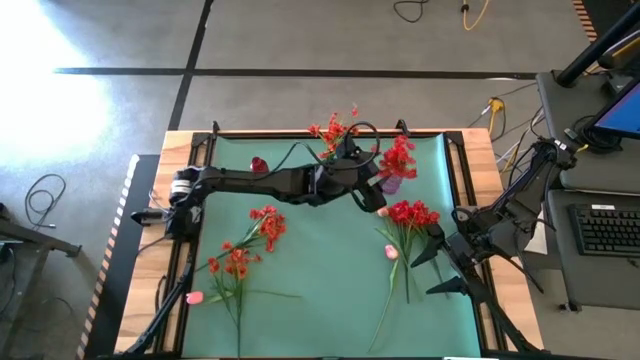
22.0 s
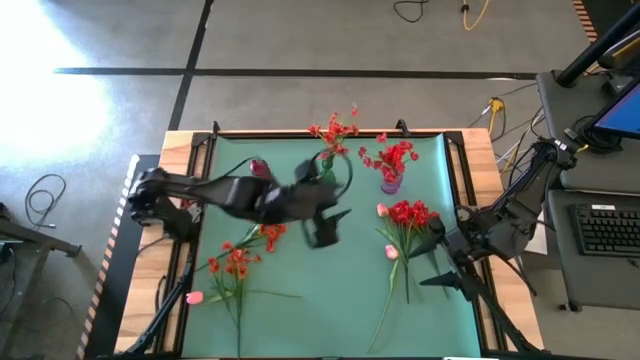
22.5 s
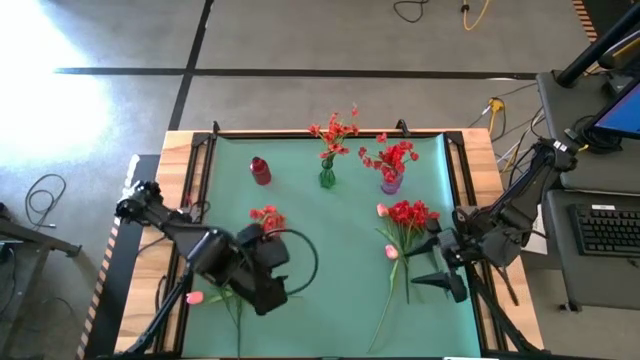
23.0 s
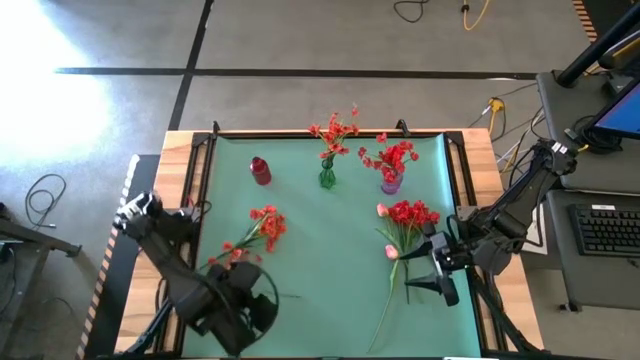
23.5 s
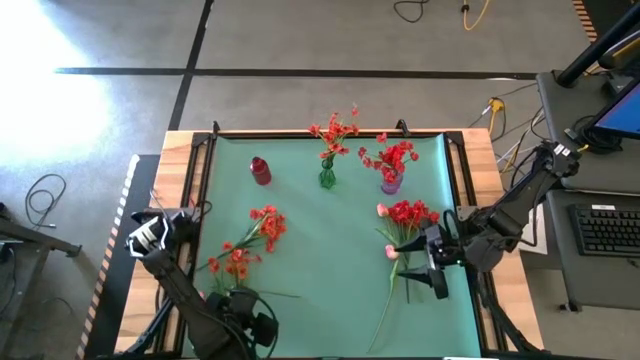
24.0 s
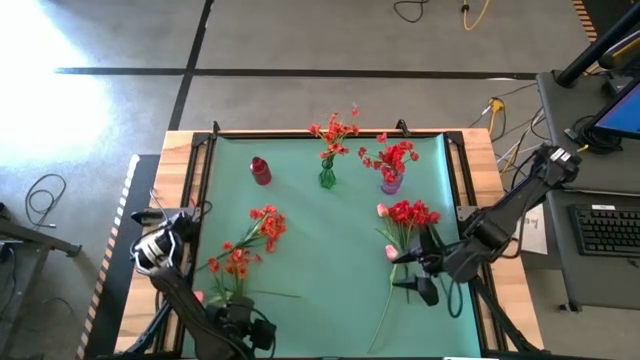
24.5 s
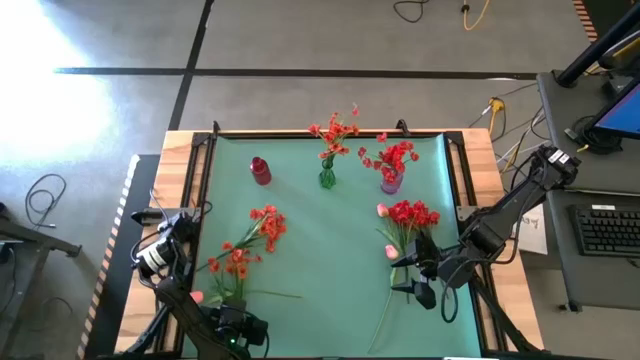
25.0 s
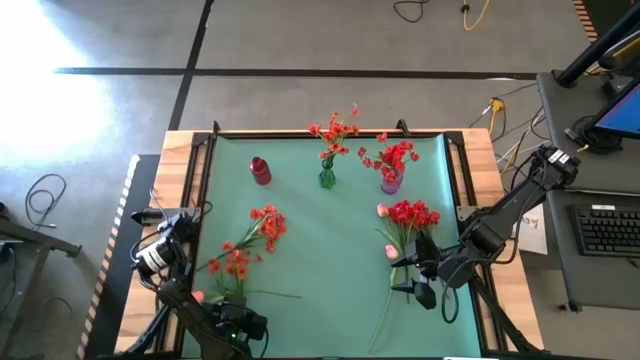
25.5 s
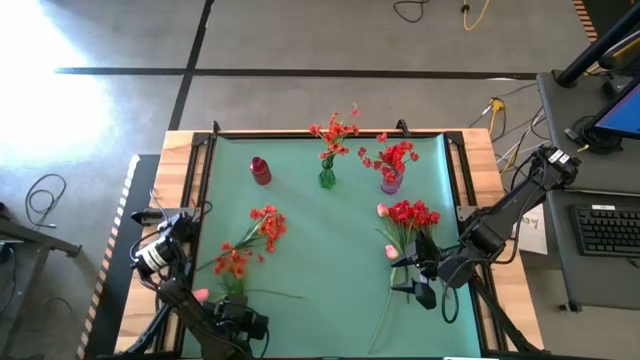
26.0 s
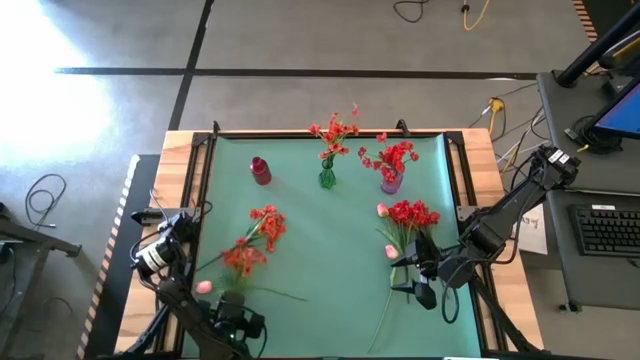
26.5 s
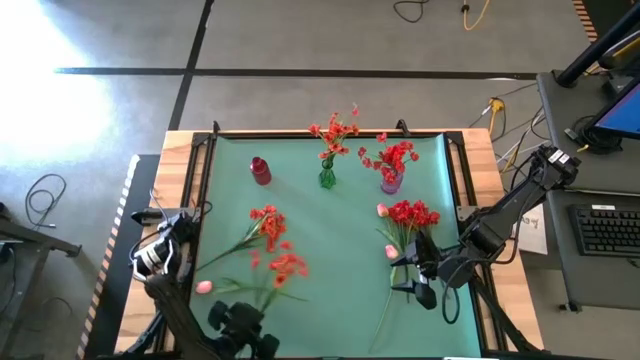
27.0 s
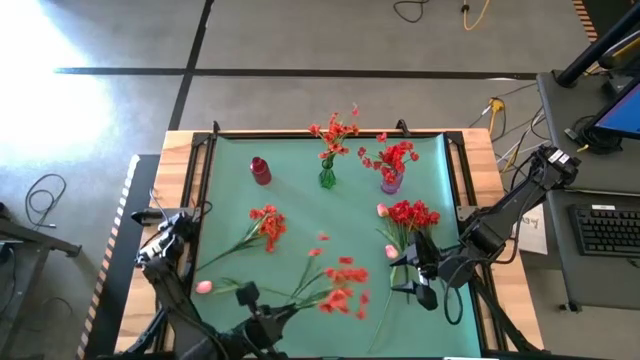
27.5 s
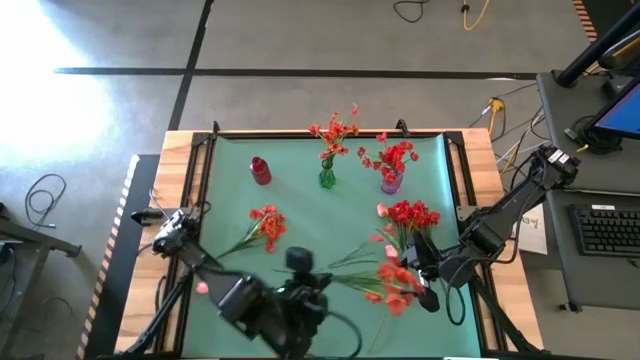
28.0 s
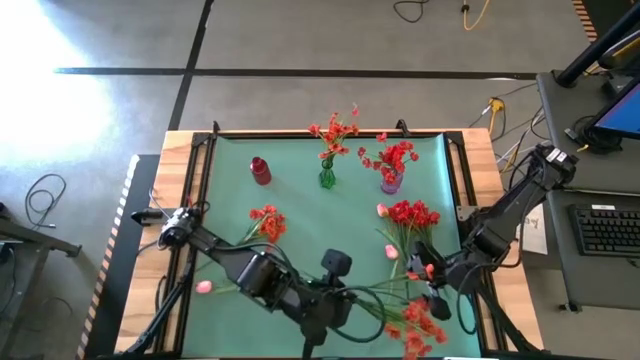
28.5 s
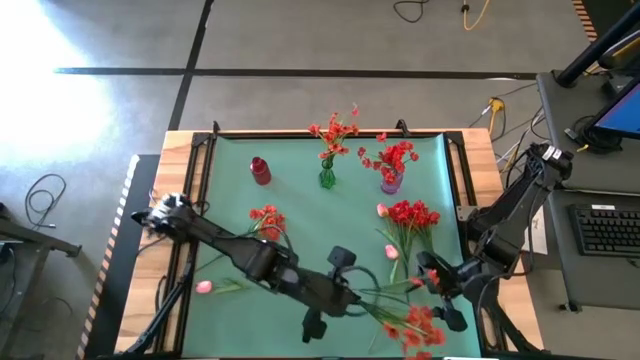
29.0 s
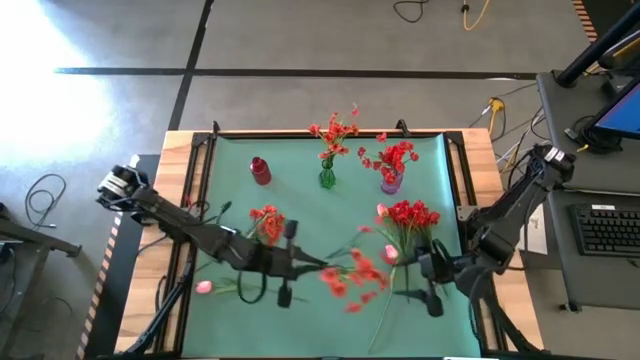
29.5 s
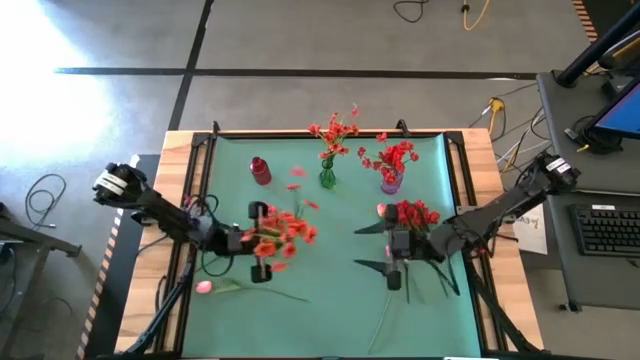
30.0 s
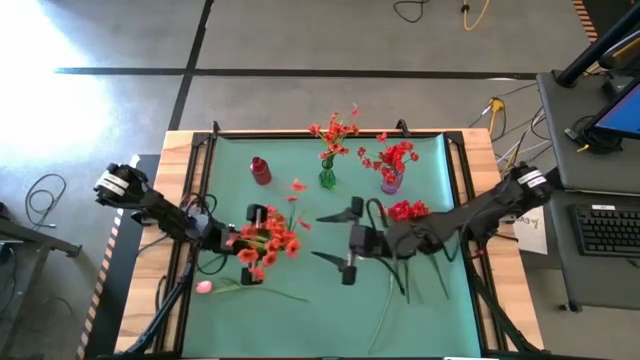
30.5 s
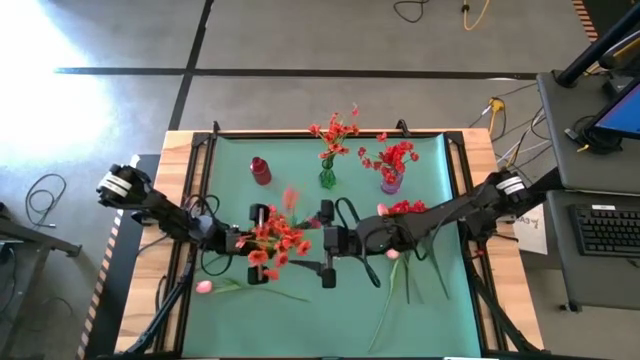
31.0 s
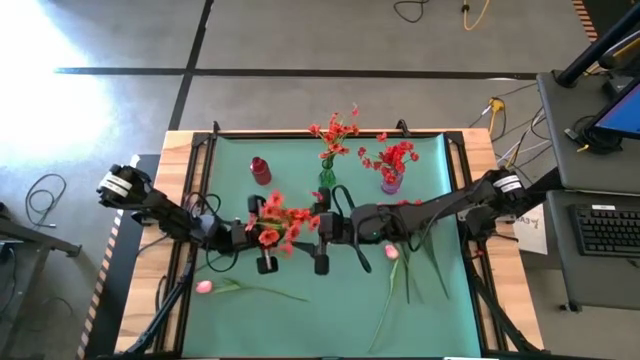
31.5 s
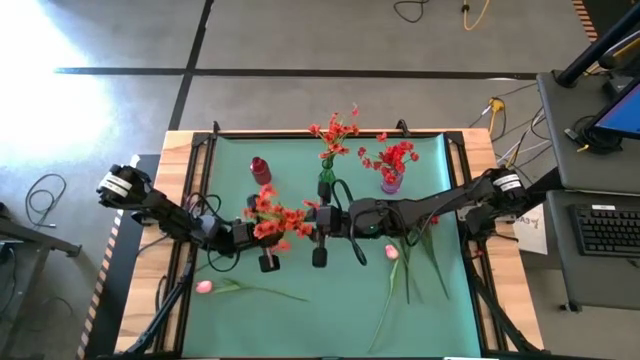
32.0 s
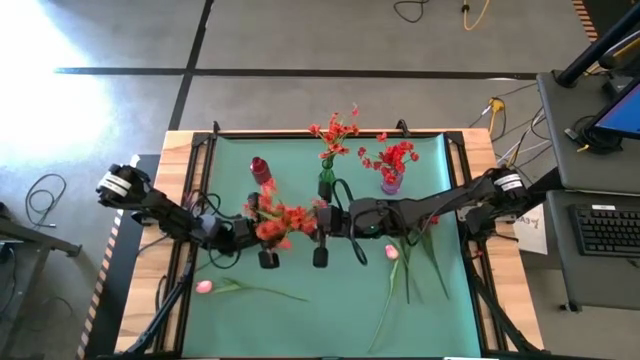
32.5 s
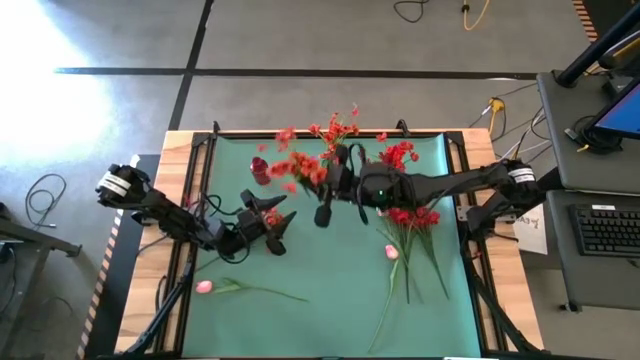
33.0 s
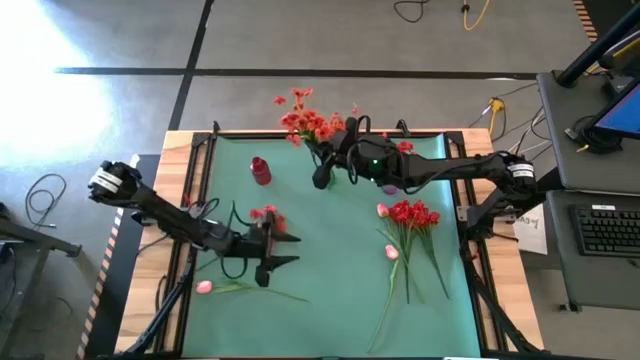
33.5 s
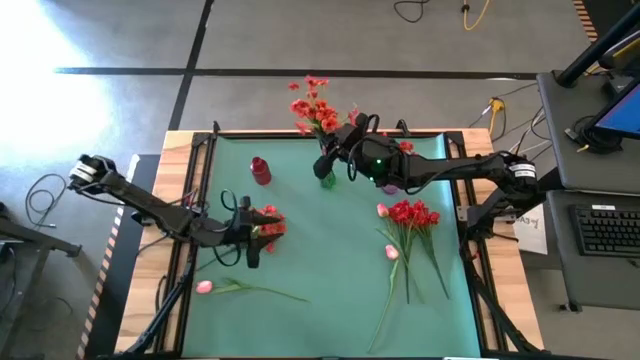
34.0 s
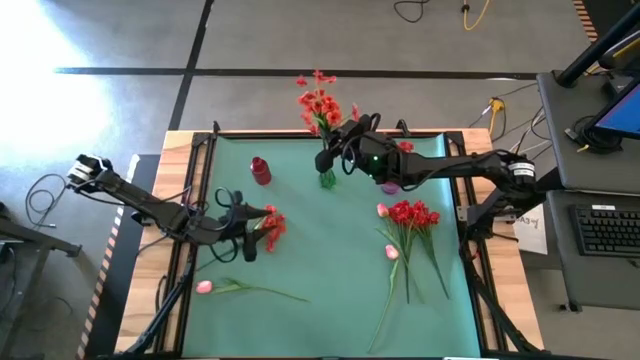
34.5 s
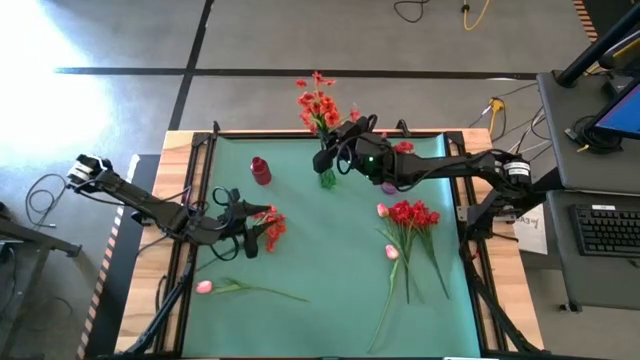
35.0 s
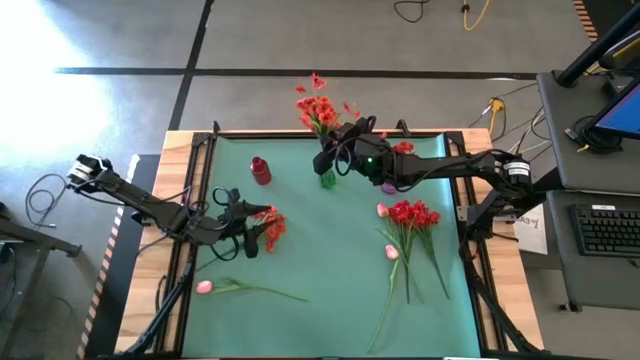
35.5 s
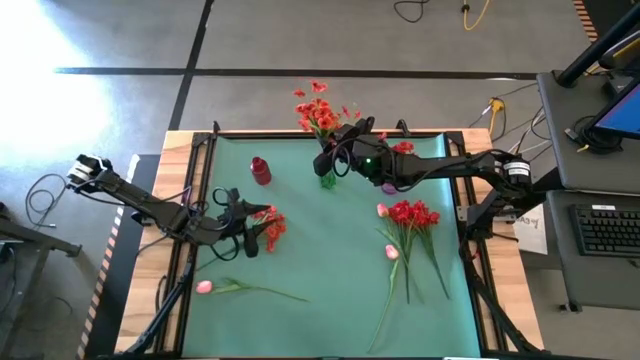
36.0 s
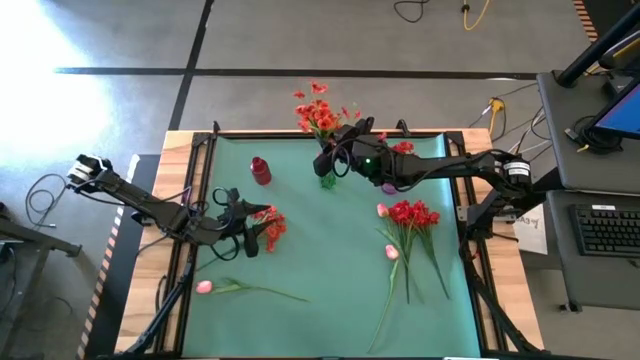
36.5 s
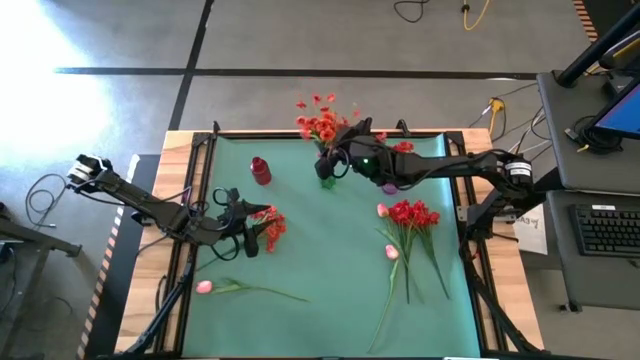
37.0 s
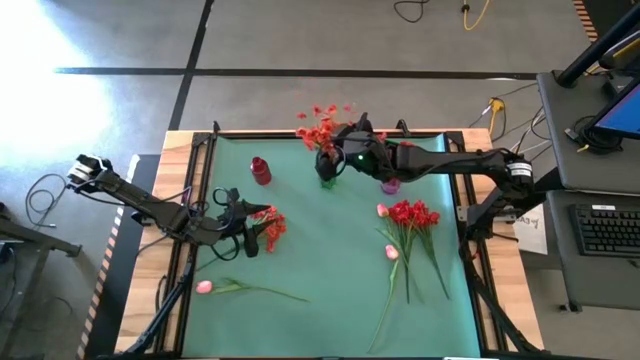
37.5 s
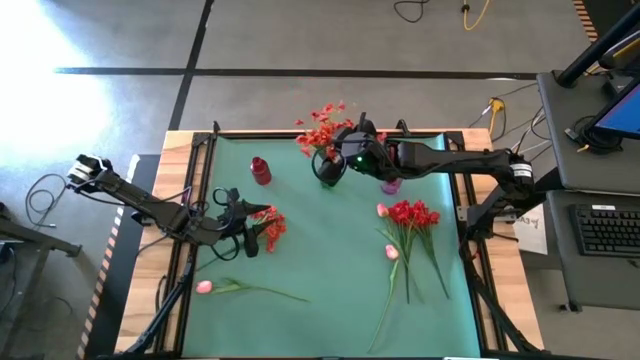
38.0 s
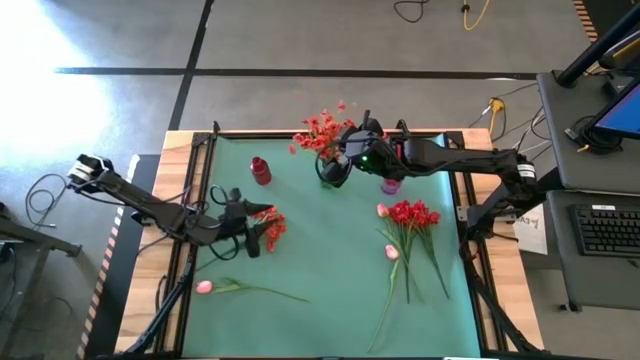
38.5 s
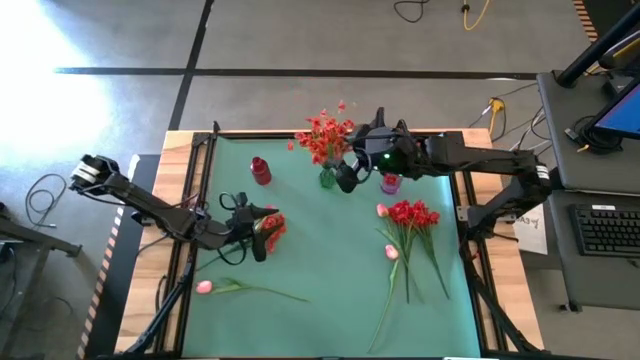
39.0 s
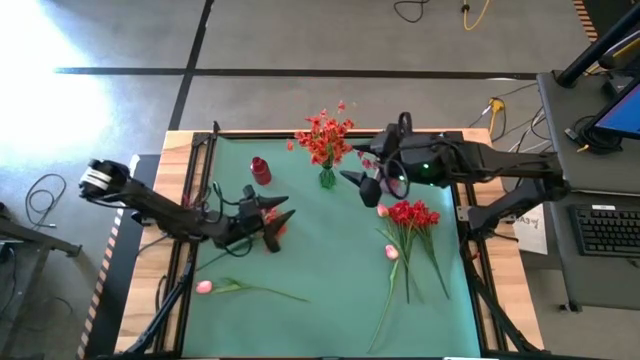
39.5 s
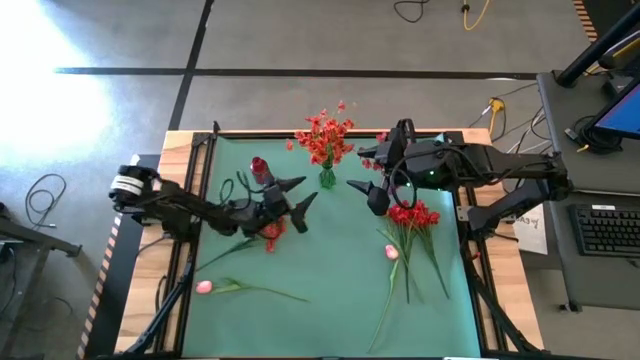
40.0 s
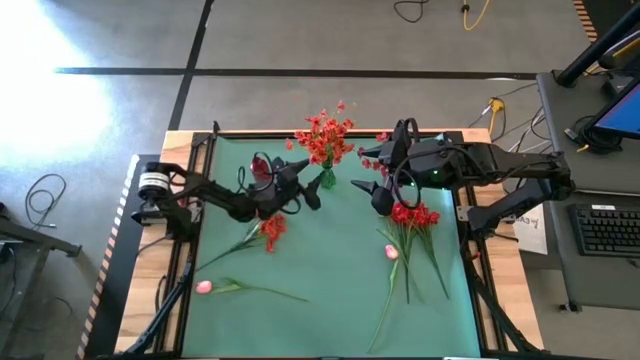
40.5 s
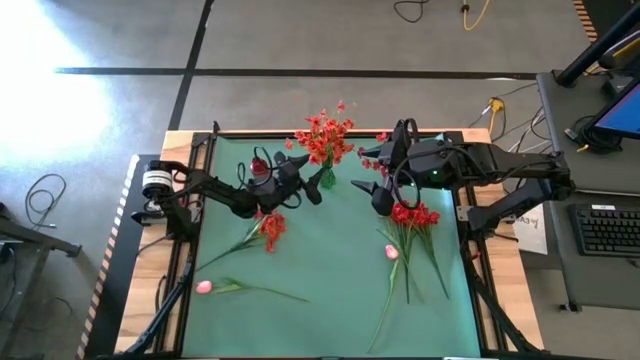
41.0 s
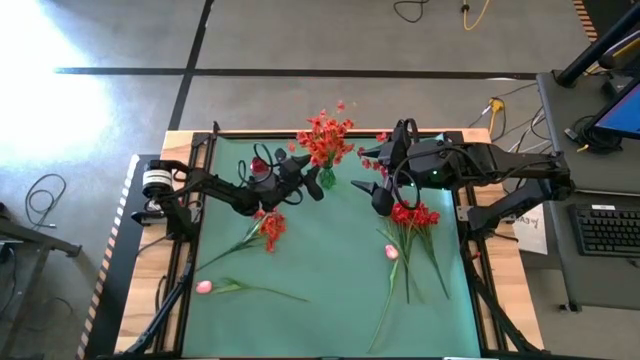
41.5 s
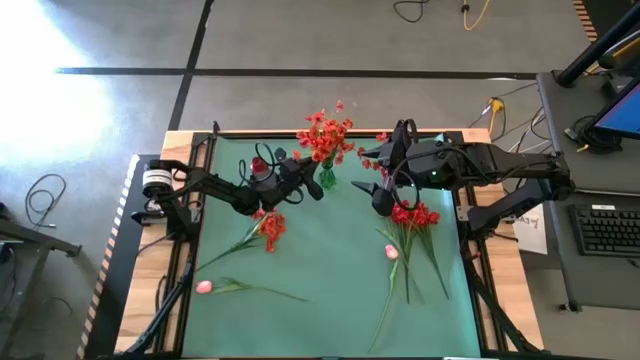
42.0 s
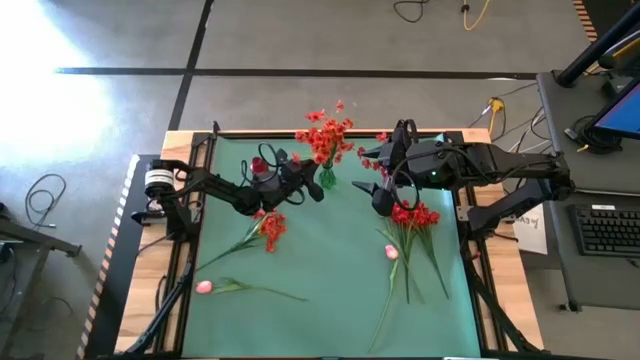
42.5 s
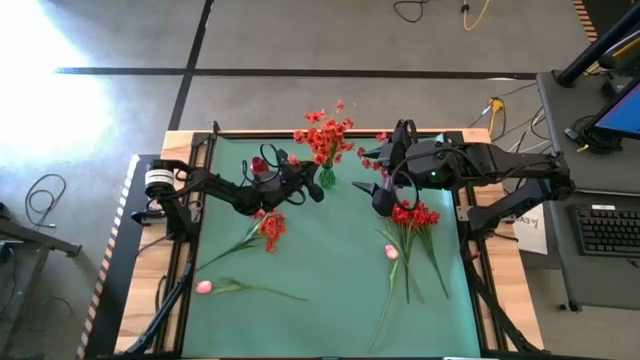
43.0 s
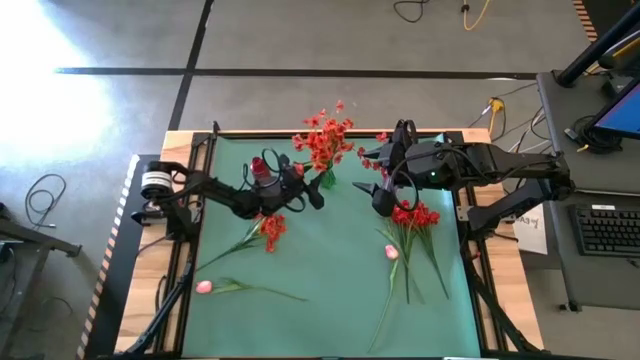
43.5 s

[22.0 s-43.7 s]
Task: Sort flowers into vase by color
Put the bottom left orange flower in the green flower vase
